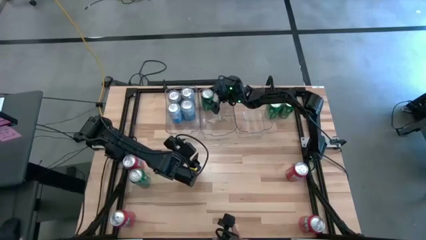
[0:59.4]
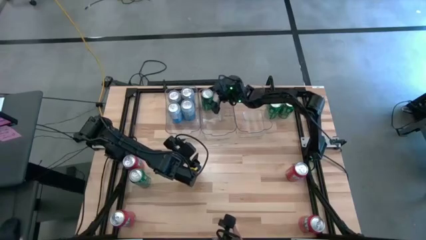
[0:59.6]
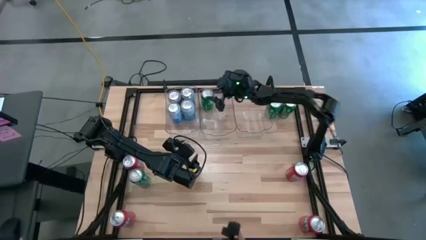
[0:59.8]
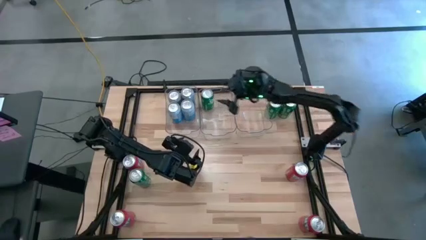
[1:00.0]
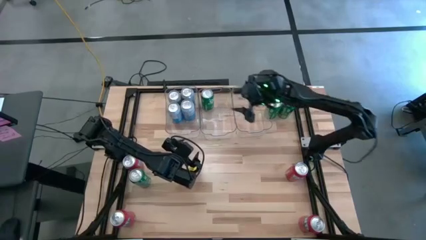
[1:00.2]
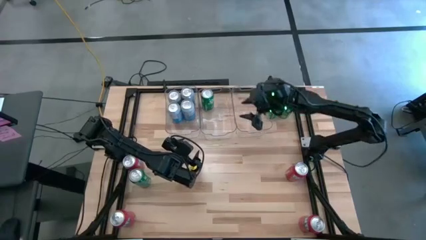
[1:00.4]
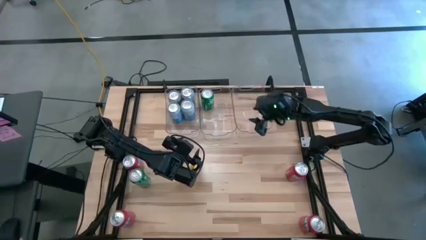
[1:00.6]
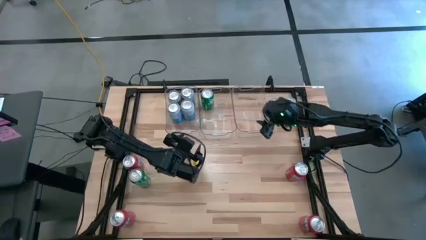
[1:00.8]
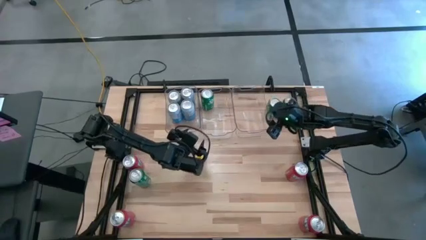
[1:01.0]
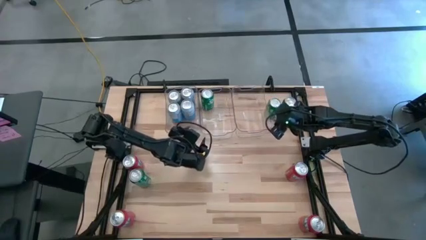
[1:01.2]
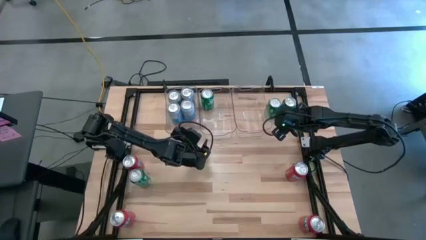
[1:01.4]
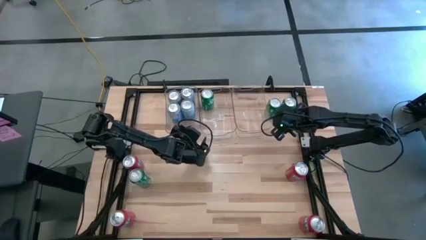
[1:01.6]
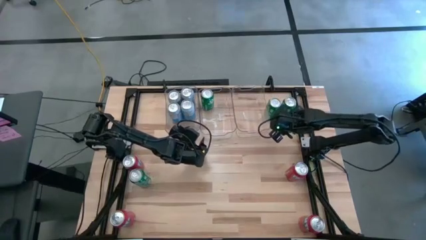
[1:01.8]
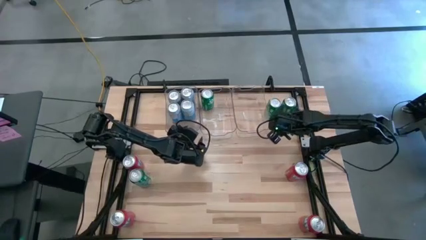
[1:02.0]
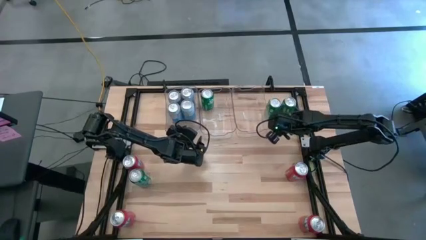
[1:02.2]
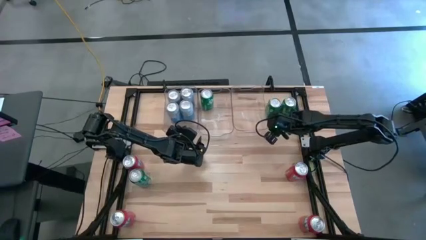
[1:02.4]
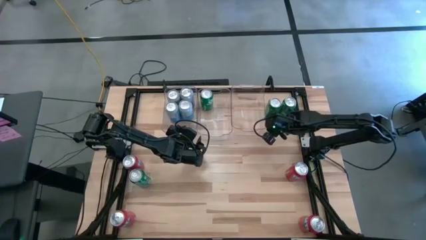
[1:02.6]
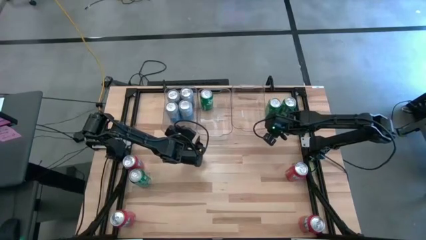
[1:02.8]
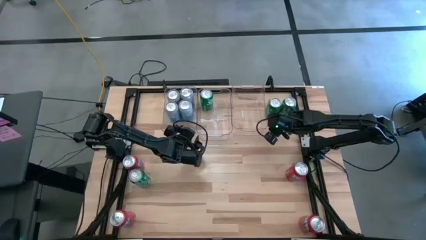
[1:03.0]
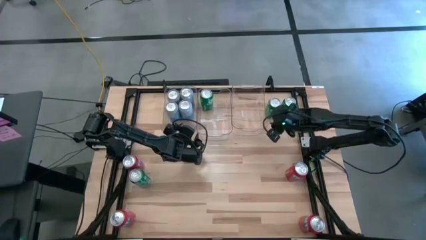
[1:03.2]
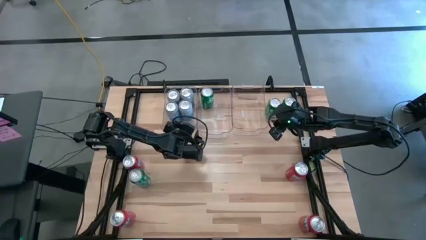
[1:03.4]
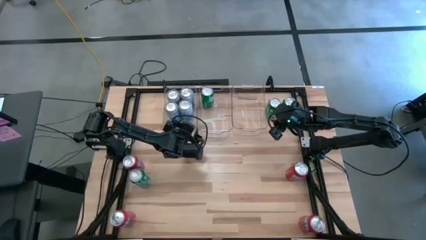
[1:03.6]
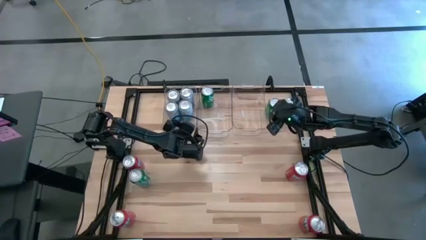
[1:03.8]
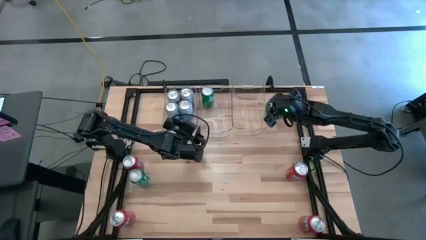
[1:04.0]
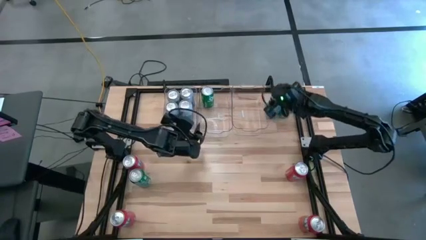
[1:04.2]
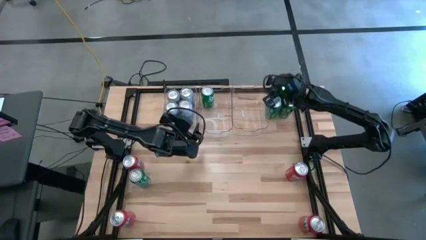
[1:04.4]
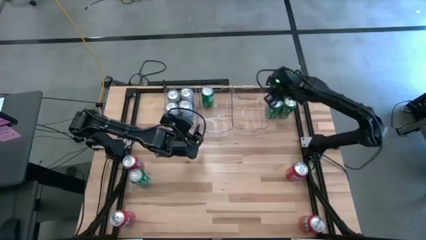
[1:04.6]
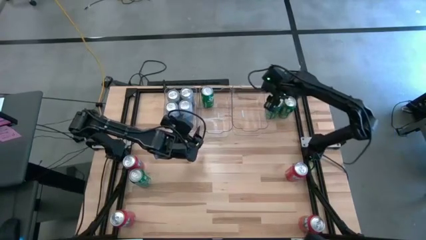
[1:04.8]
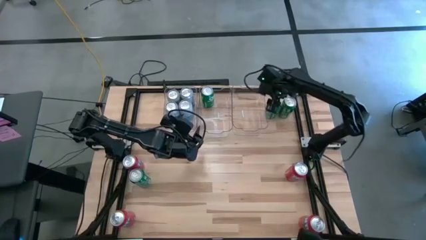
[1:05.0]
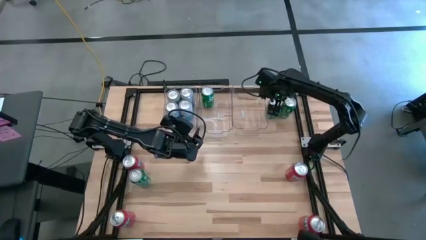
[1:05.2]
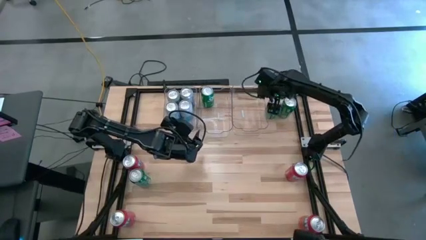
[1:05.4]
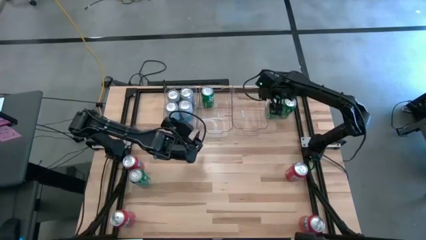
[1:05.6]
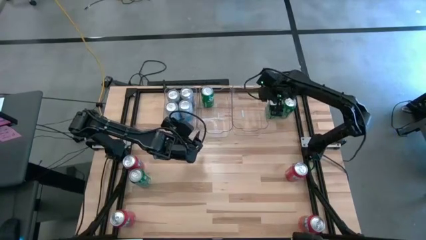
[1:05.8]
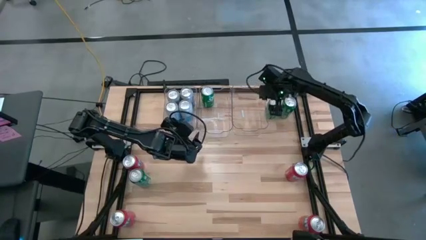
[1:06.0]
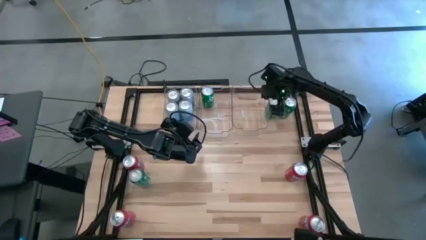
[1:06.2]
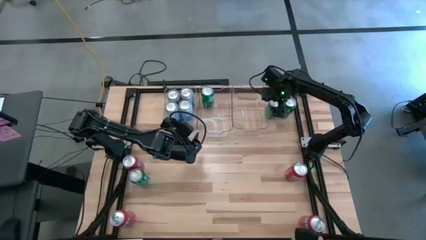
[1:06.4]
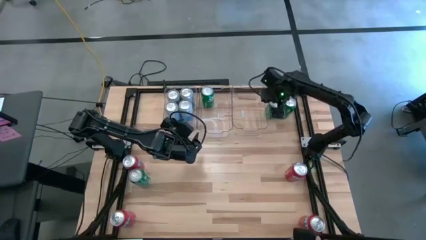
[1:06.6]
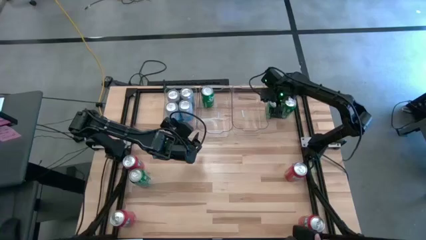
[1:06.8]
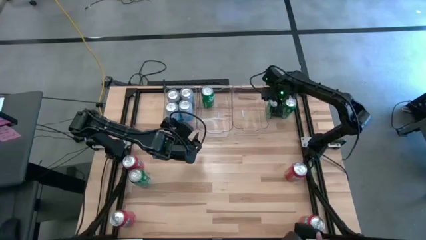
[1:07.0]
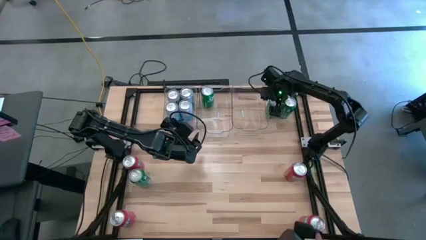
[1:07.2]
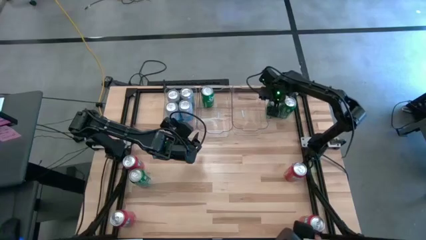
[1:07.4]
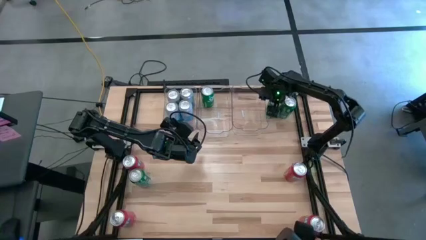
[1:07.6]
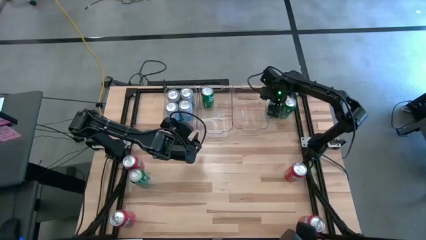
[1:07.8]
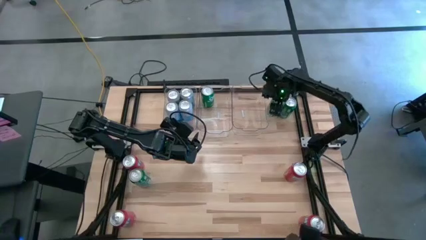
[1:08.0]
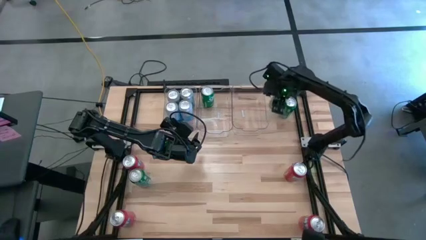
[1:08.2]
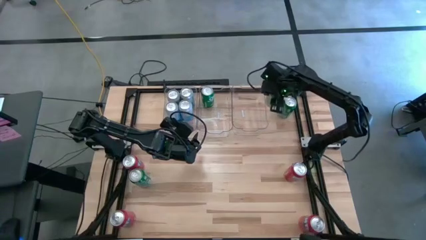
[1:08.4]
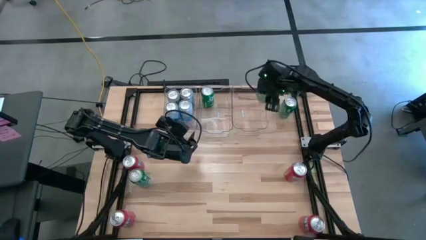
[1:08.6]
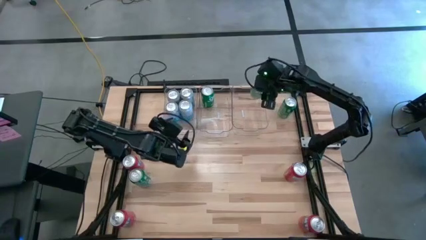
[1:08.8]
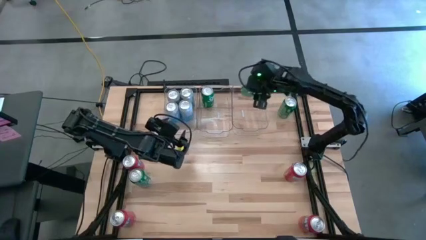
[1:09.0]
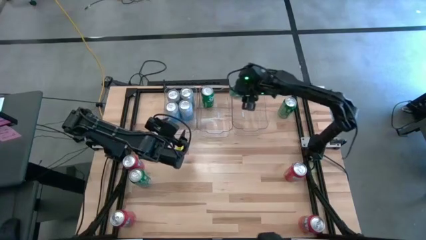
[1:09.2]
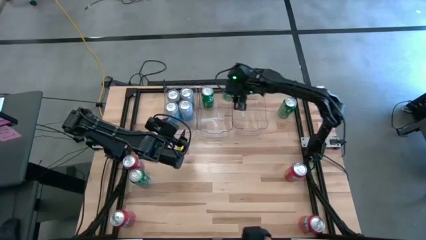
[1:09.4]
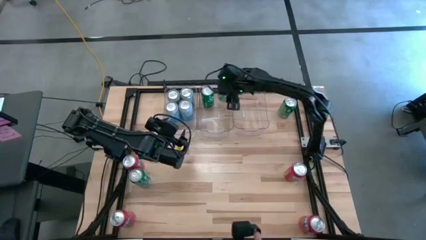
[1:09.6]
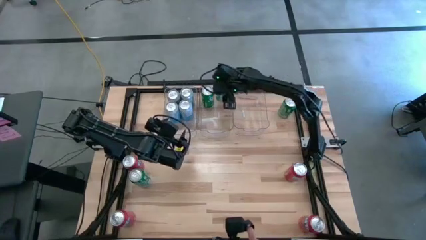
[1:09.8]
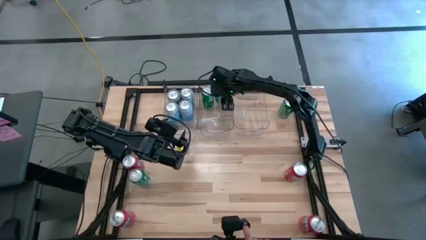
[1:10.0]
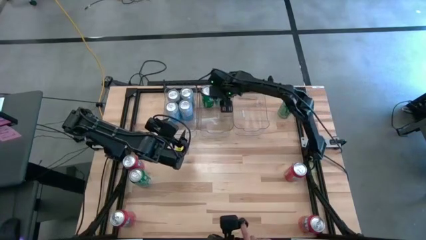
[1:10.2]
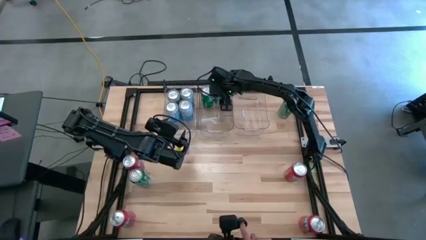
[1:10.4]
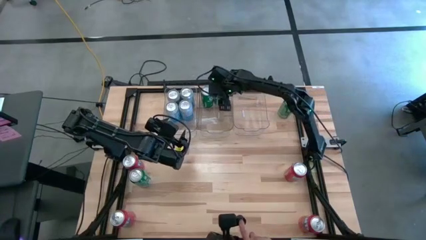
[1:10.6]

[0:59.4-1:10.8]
Task: Sort soda cans
Put the green soda can into the middle transparent bin

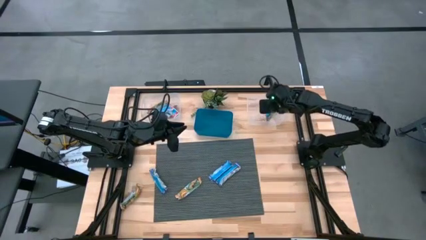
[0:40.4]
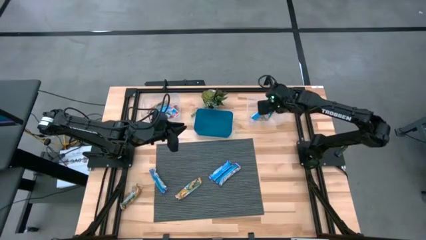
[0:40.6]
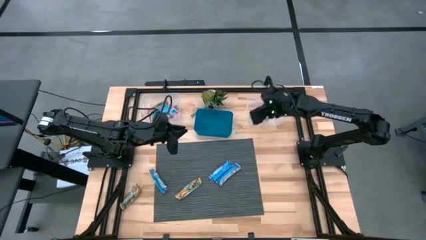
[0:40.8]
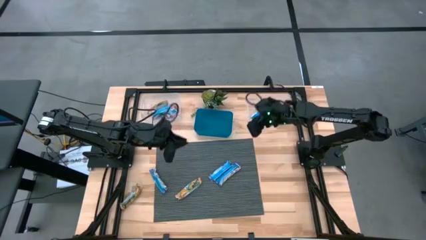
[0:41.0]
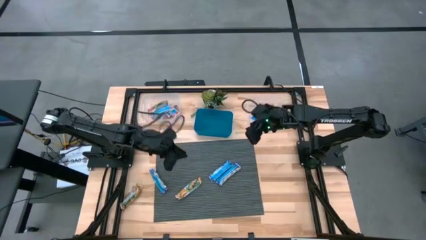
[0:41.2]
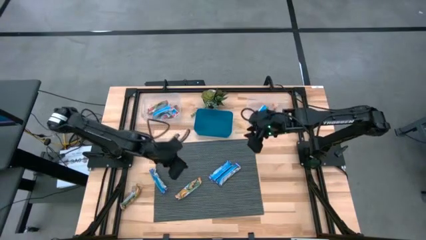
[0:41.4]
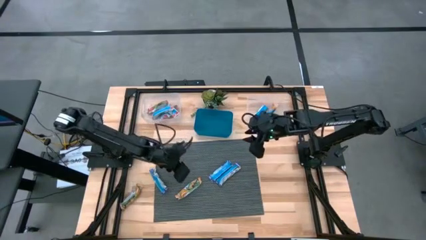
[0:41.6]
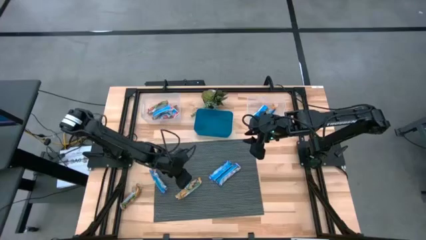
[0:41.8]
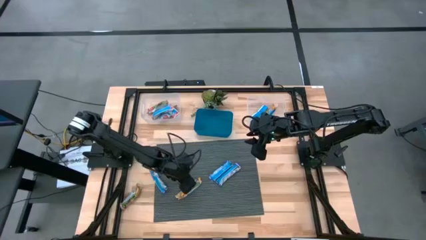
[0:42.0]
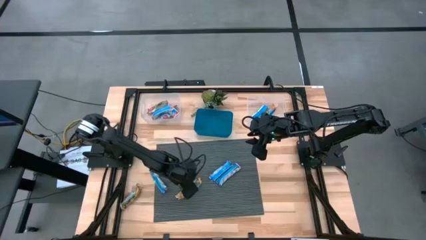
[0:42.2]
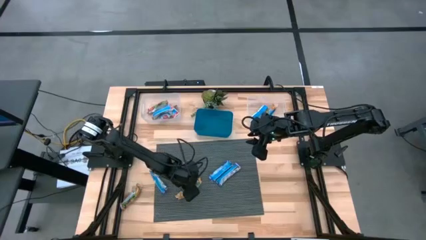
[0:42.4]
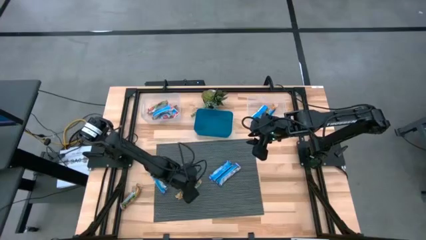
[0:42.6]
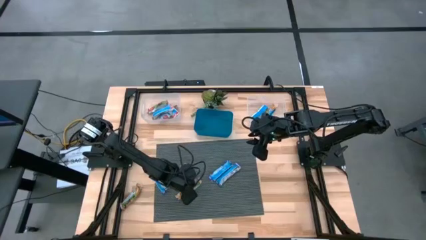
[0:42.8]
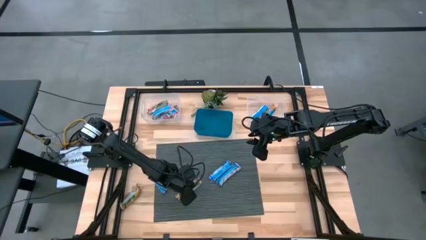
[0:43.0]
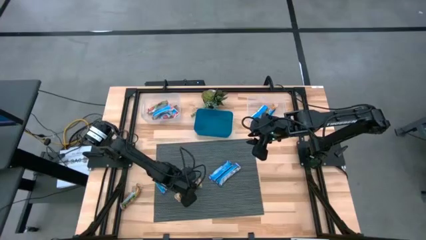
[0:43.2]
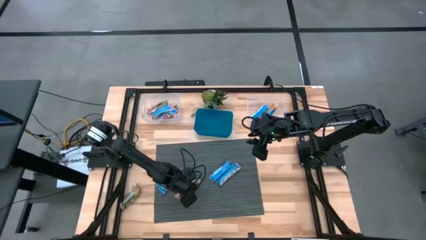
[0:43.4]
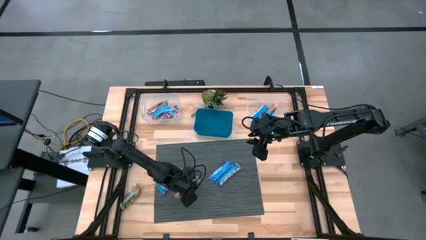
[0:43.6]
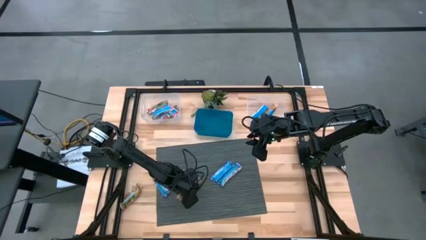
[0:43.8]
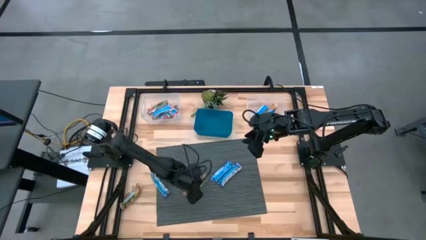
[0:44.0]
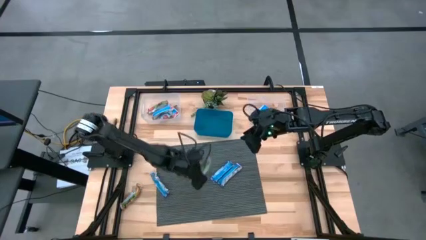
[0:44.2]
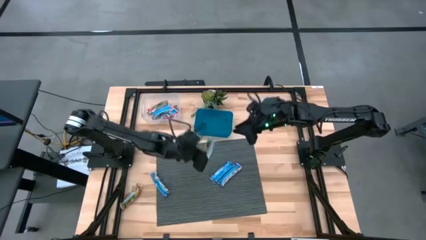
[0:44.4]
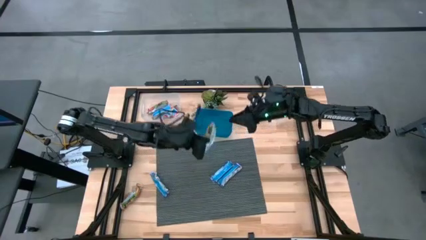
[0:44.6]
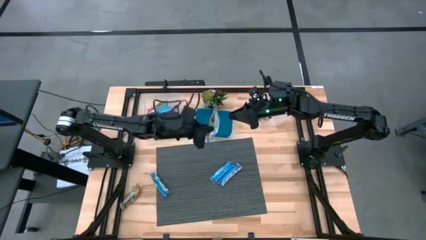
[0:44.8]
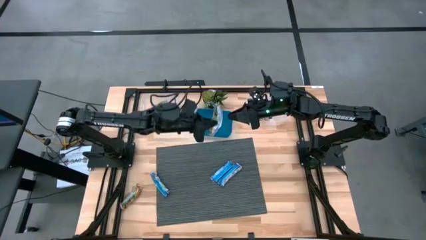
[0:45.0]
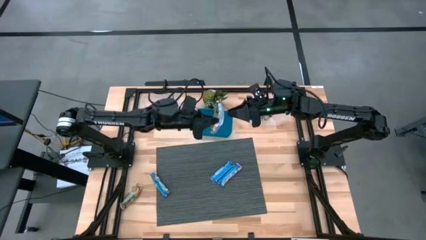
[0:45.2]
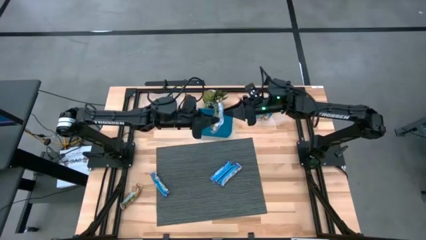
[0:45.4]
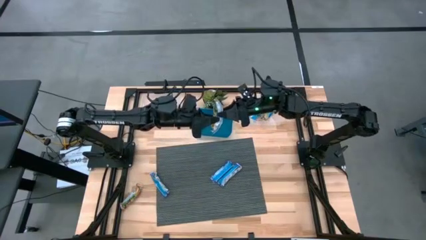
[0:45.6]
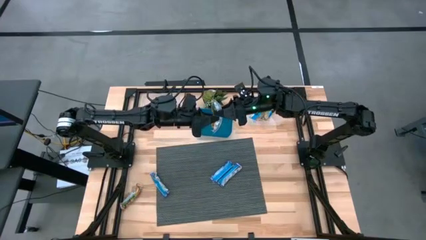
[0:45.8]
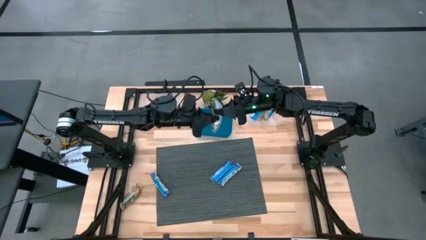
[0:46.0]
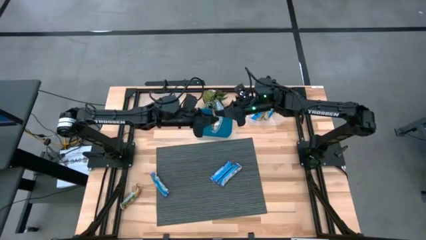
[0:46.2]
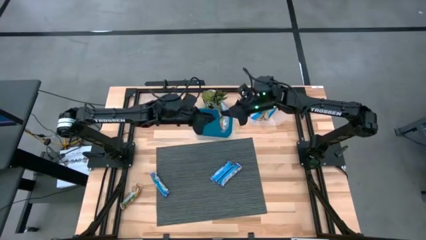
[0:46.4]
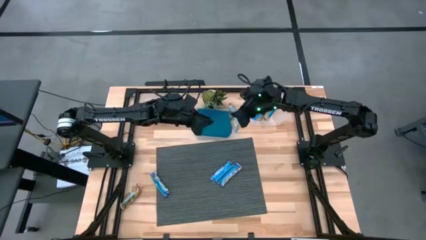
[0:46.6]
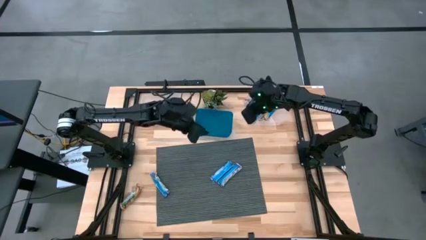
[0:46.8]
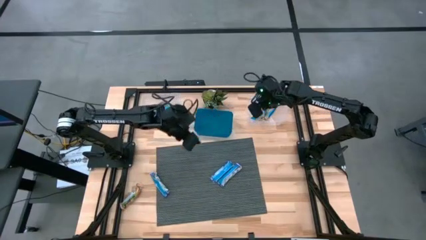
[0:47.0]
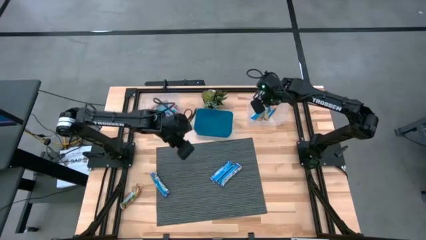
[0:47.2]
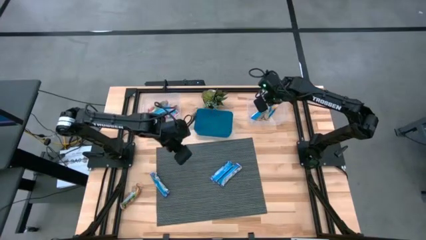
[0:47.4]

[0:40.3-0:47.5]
Task: Pick and place Granola Bars by type
Put the yellow granola bar into the right transparent bin
